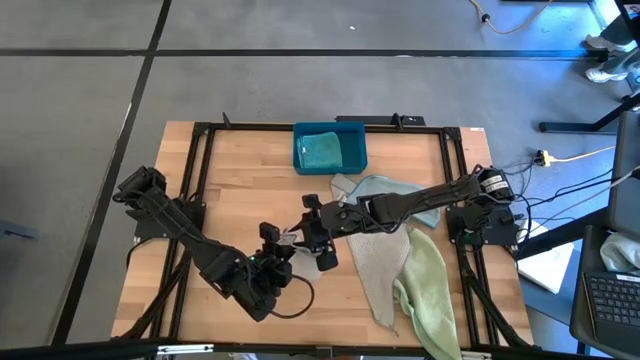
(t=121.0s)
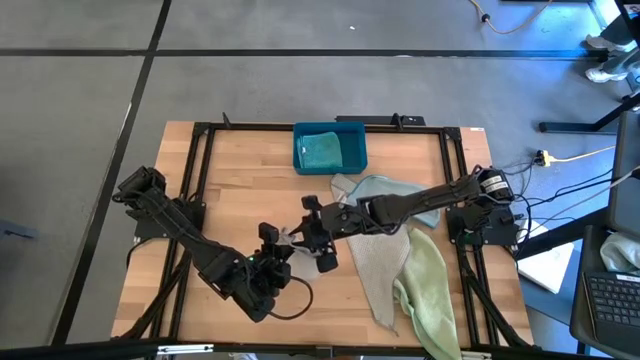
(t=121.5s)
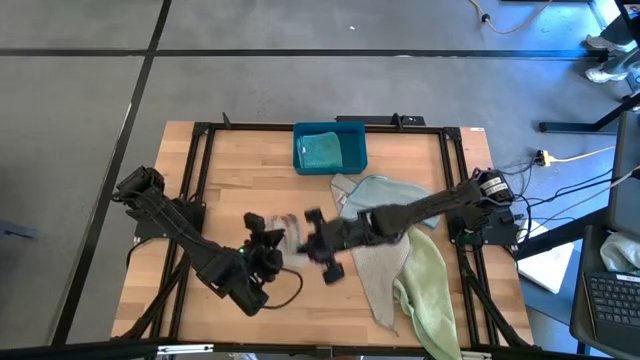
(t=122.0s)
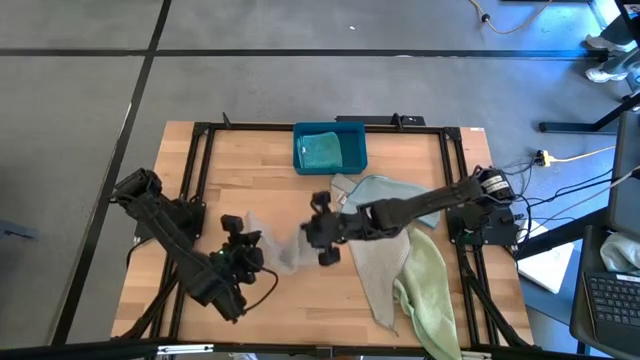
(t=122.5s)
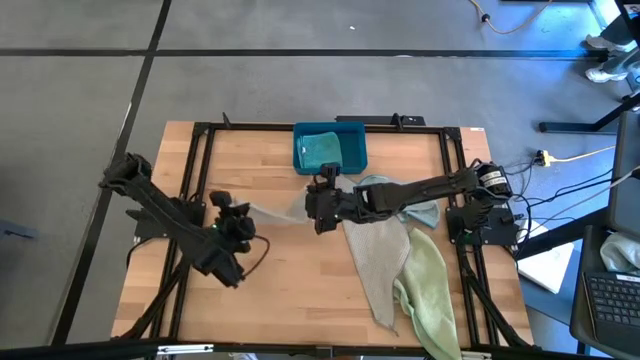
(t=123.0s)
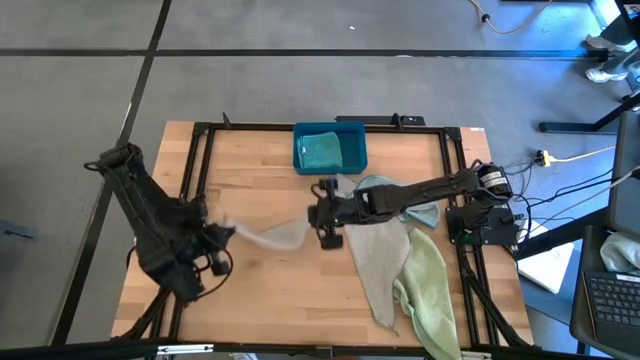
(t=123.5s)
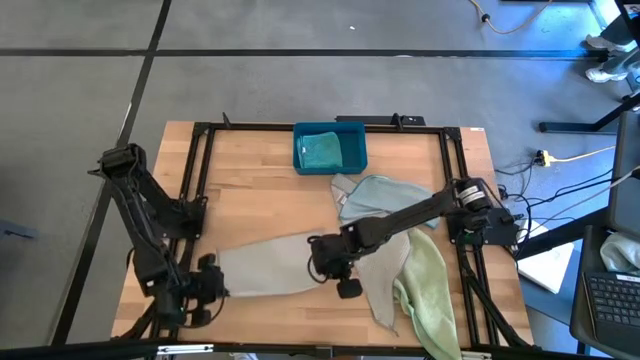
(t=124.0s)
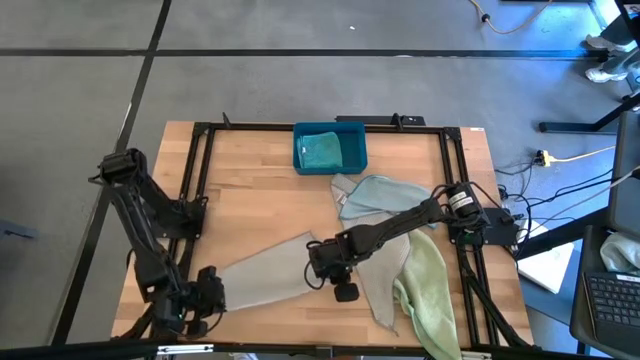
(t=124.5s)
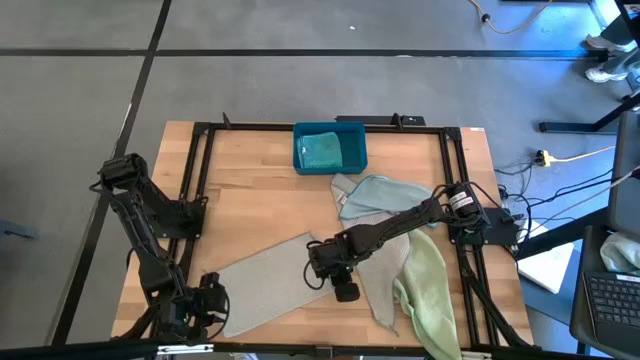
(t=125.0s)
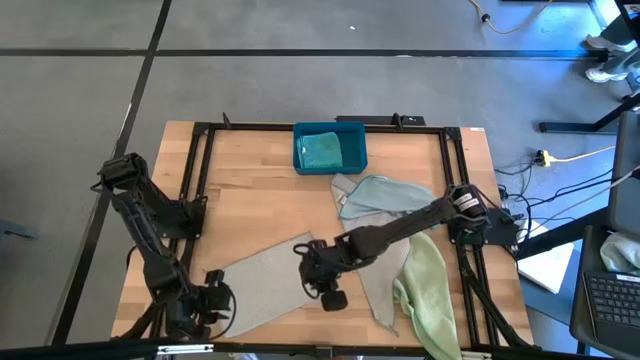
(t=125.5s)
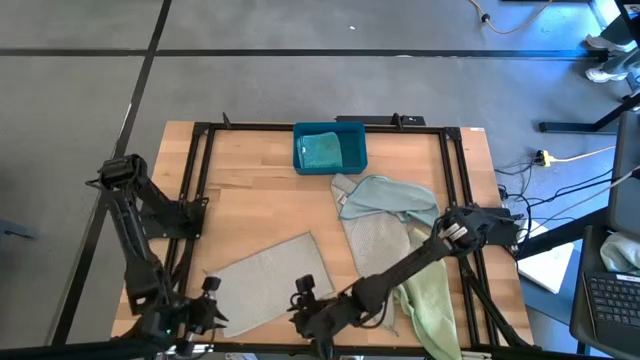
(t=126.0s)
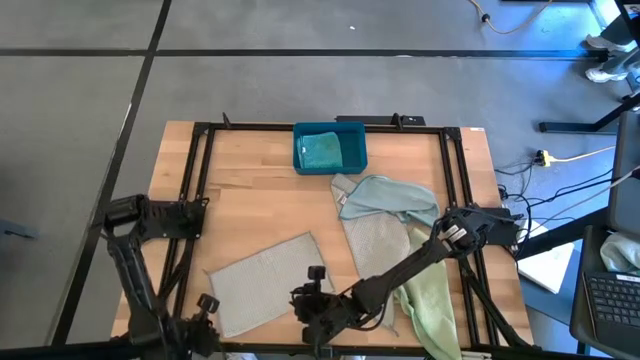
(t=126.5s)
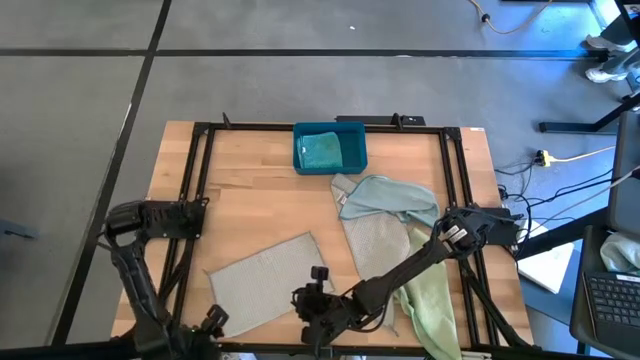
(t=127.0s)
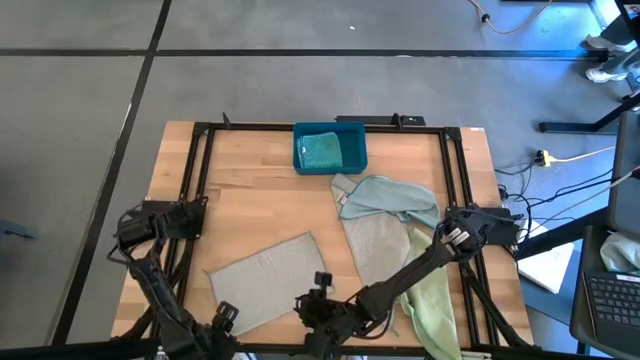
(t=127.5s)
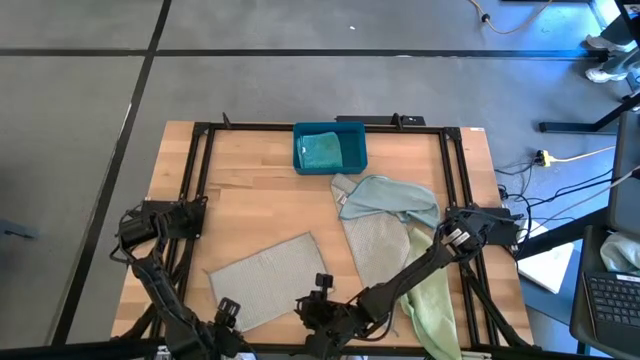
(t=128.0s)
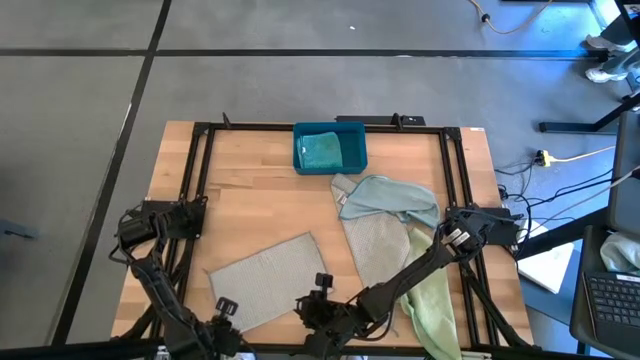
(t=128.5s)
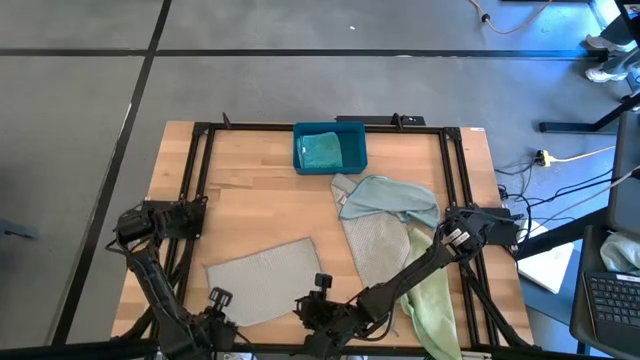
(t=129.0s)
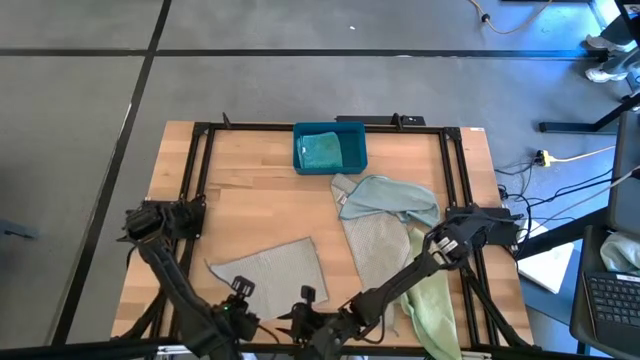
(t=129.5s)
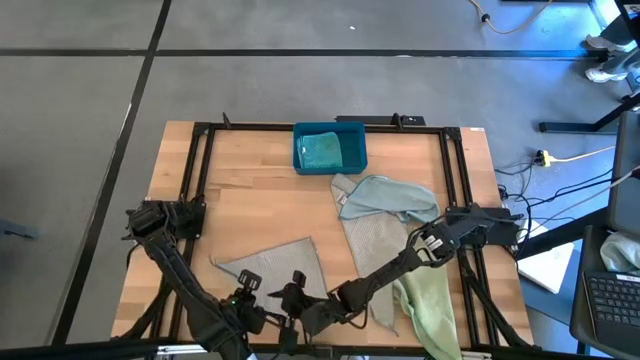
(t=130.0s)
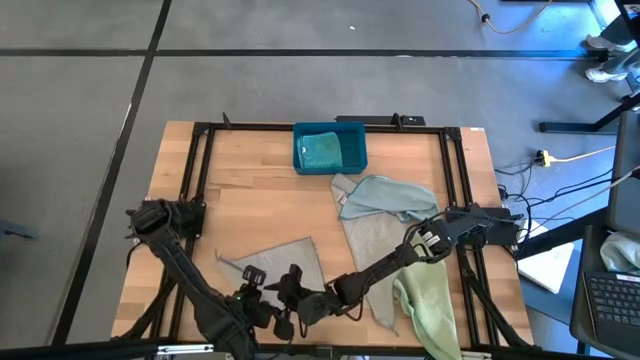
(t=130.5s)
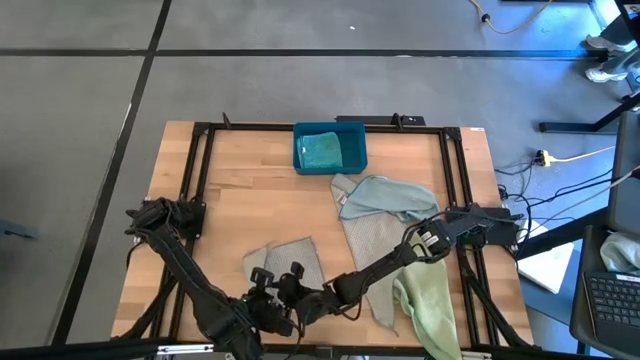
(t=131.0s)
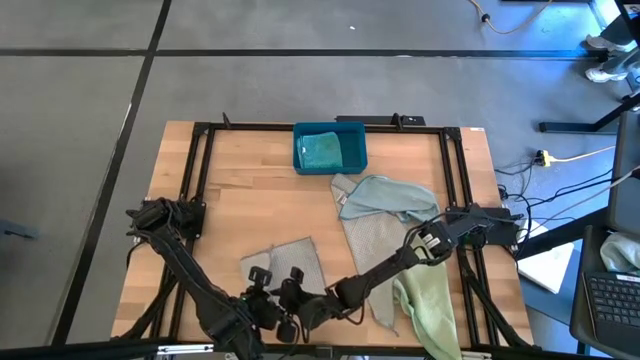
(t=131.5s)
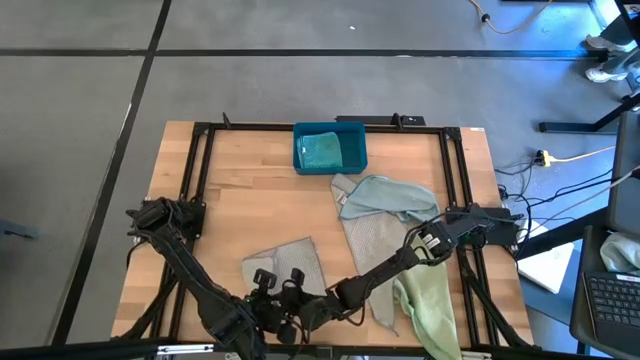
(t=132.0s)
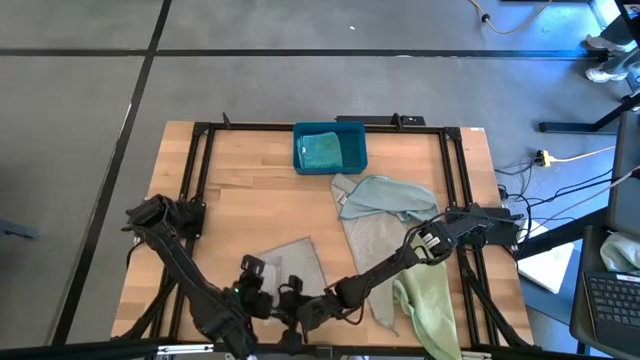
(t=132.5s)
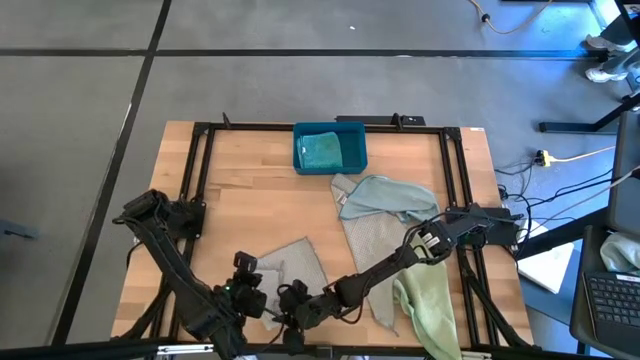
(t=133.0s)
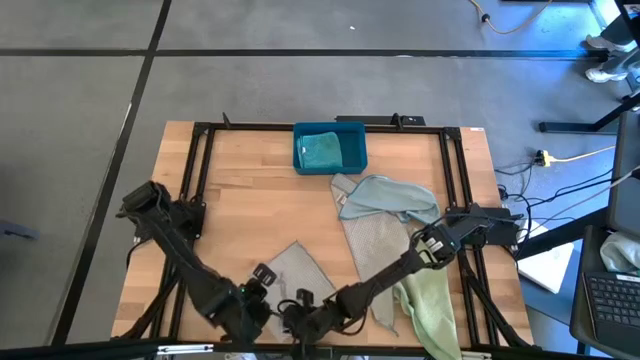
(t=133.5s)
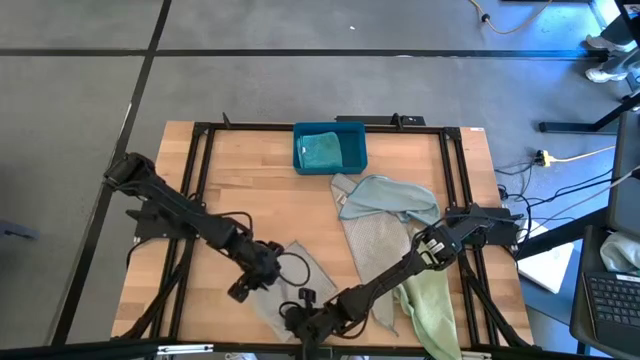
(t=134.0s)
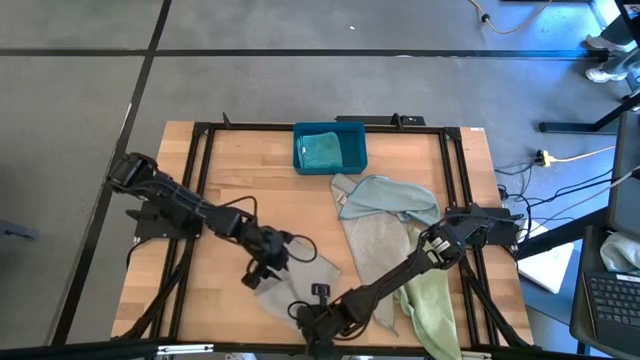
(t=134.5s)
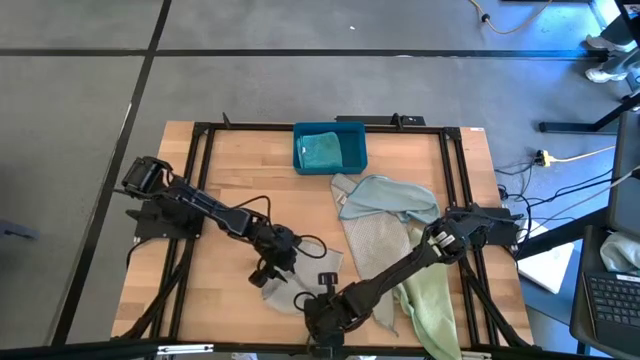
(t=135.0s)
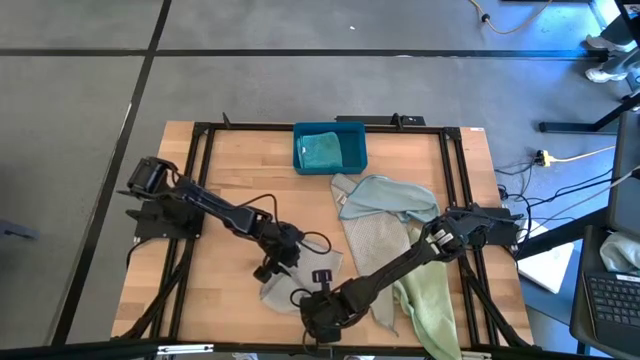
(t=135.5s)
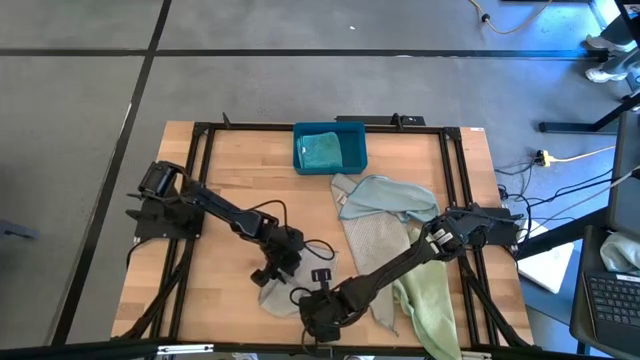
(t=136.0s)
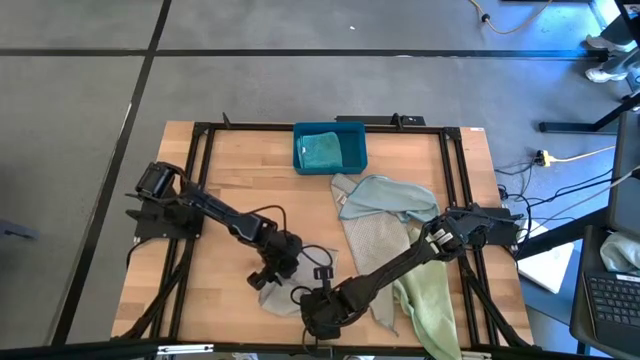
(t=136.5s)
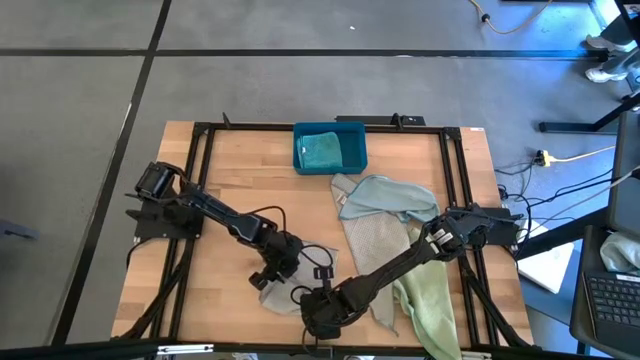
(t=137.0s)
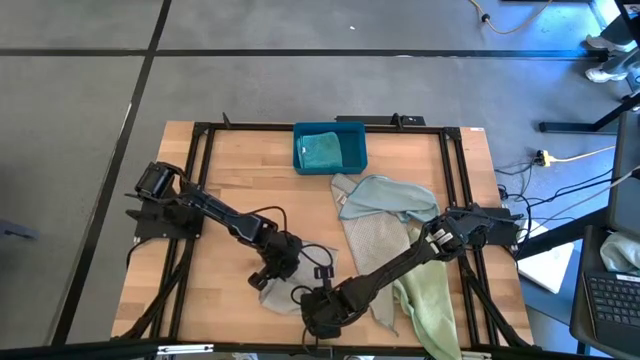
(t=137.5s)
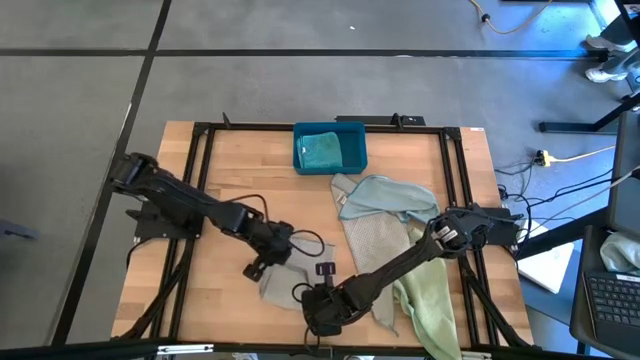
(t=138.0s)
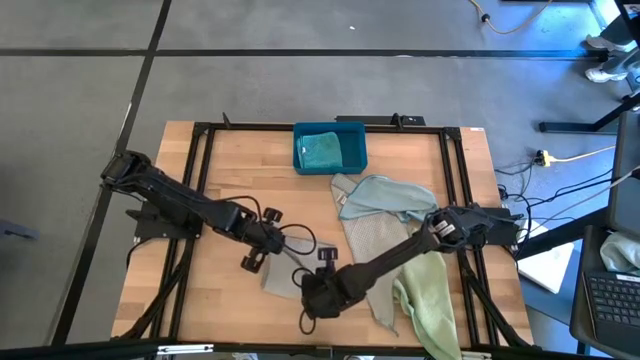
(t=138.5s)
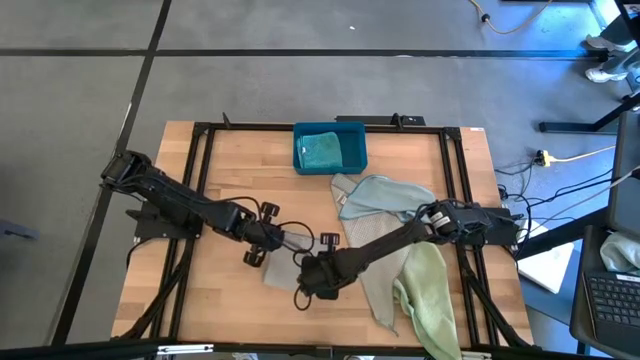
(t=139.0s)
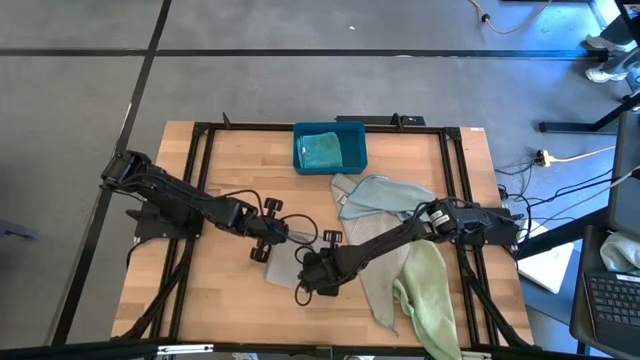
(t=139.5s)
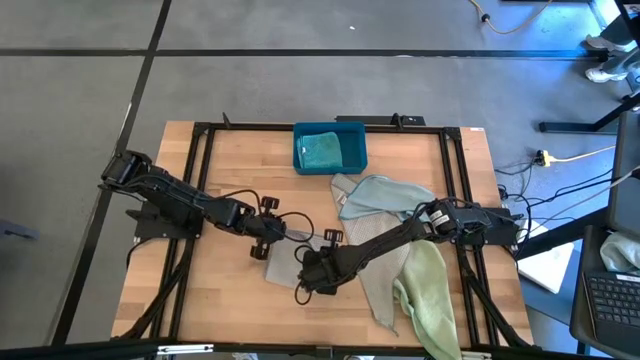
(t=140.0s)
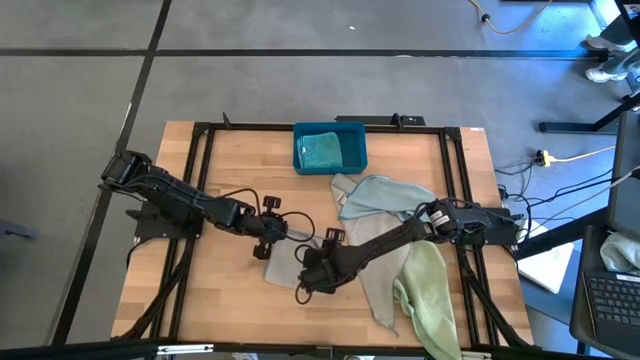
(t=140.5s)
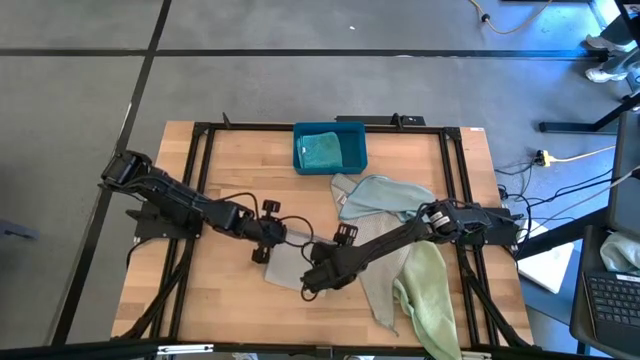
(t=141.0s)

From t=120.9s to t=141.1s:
Task: Fold microfiber towels
Fold the left gray towel
